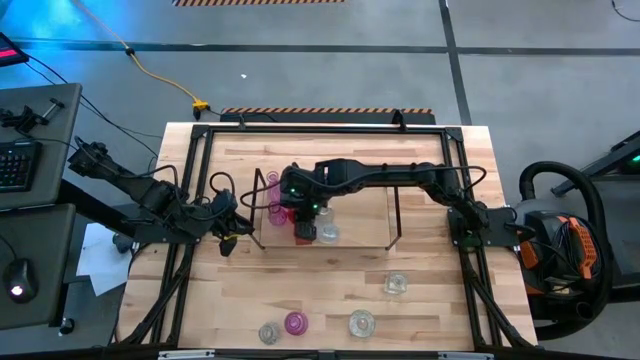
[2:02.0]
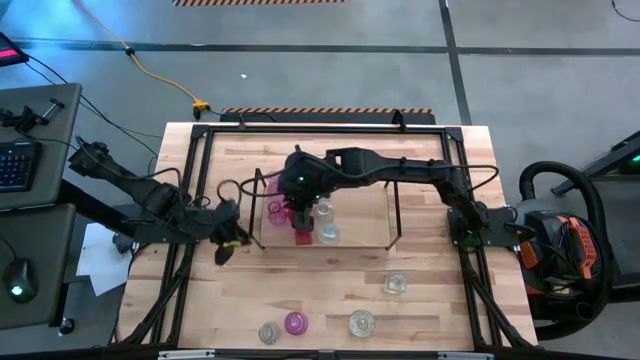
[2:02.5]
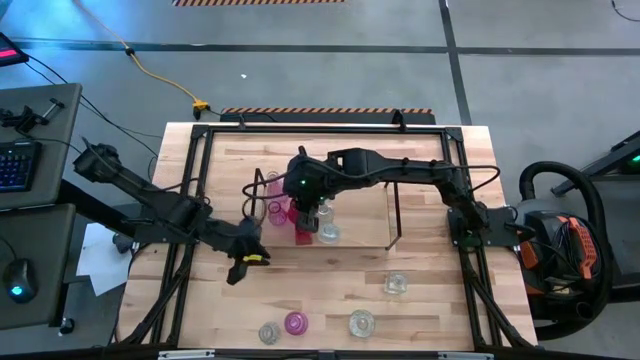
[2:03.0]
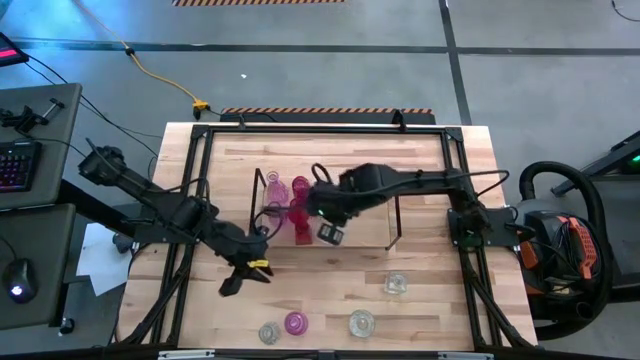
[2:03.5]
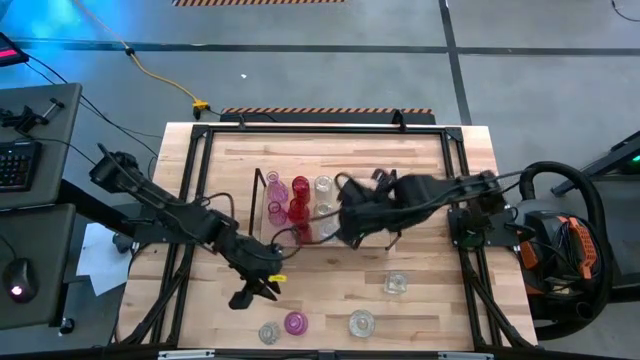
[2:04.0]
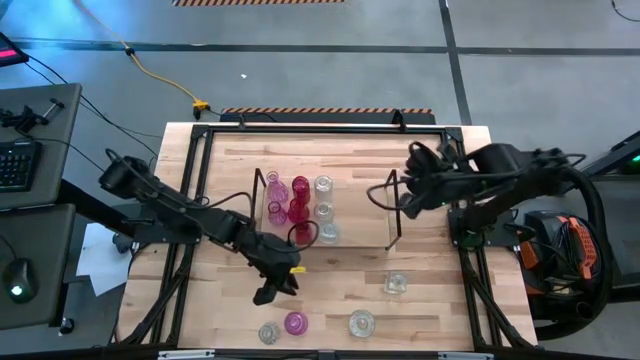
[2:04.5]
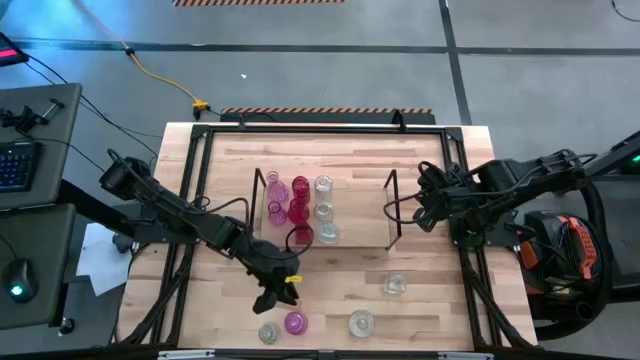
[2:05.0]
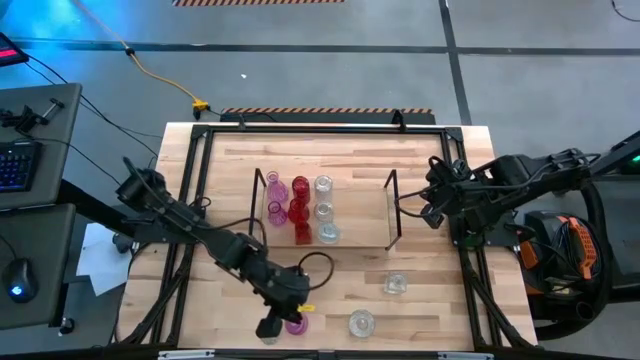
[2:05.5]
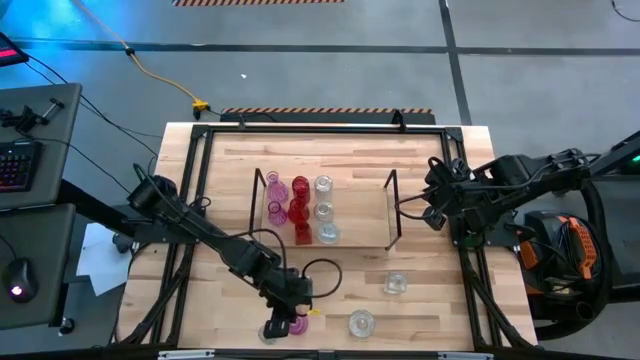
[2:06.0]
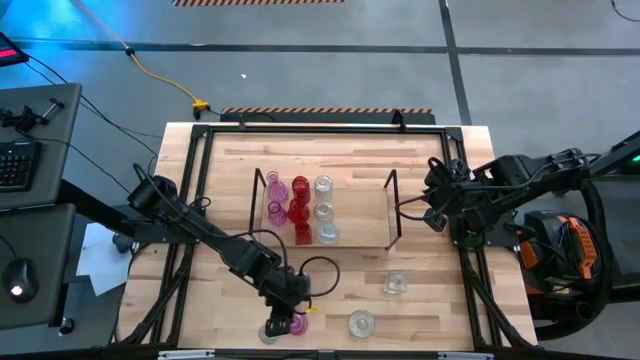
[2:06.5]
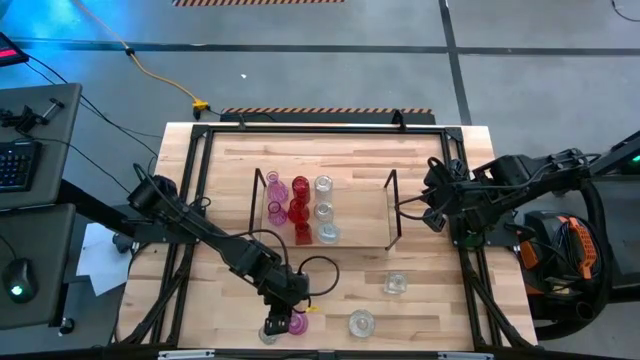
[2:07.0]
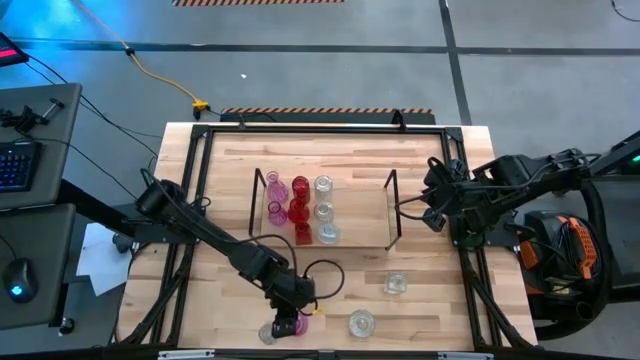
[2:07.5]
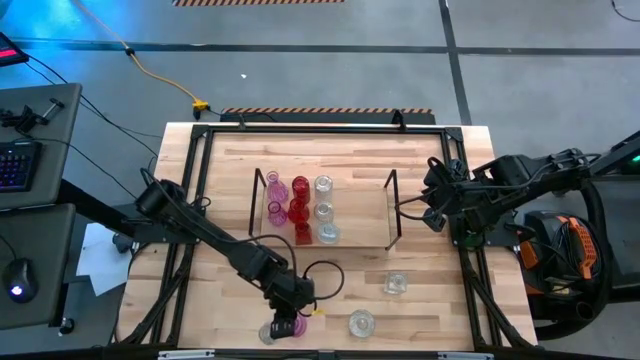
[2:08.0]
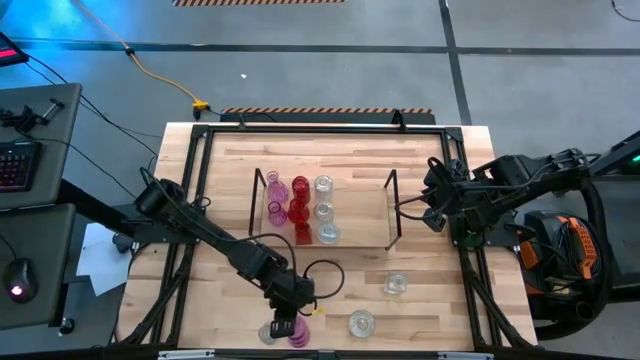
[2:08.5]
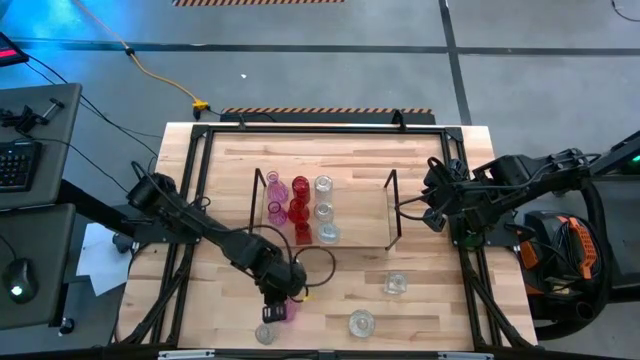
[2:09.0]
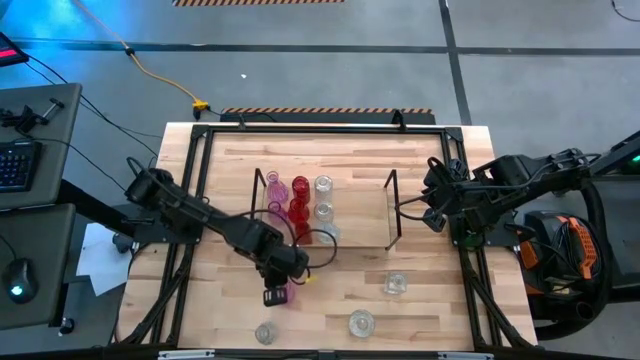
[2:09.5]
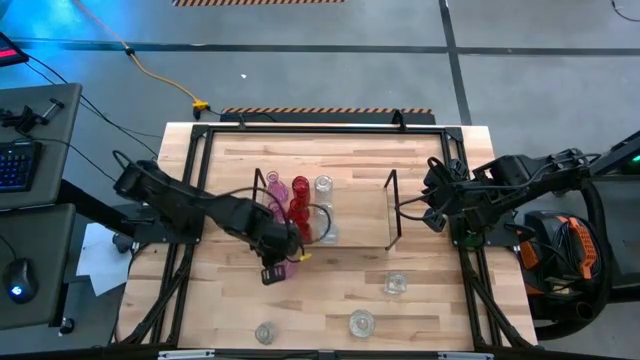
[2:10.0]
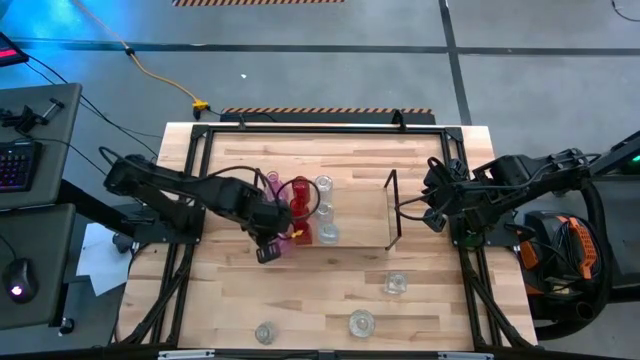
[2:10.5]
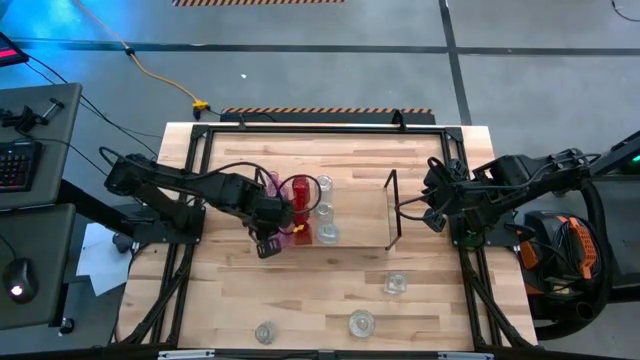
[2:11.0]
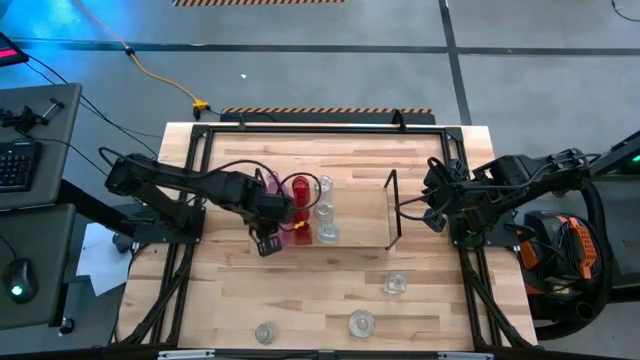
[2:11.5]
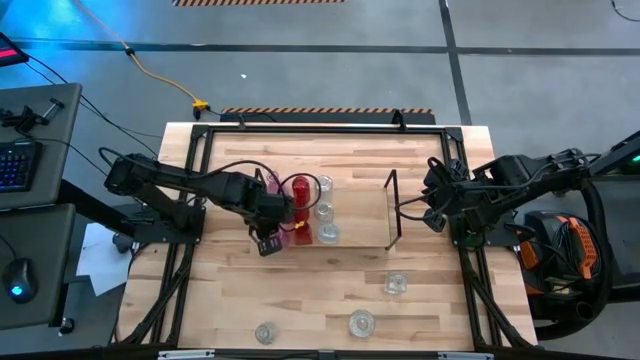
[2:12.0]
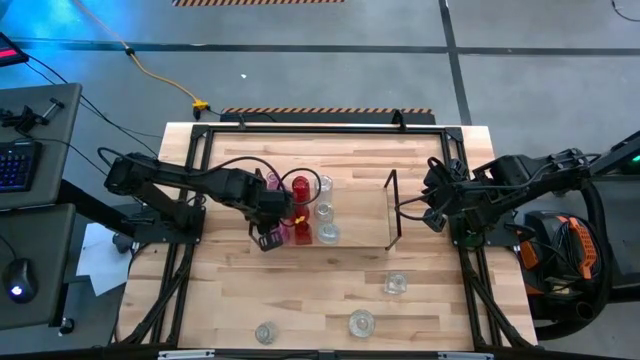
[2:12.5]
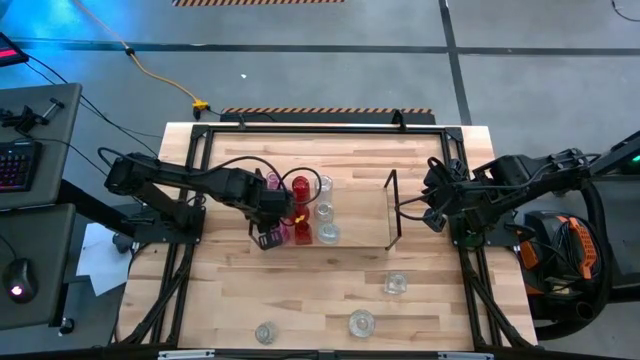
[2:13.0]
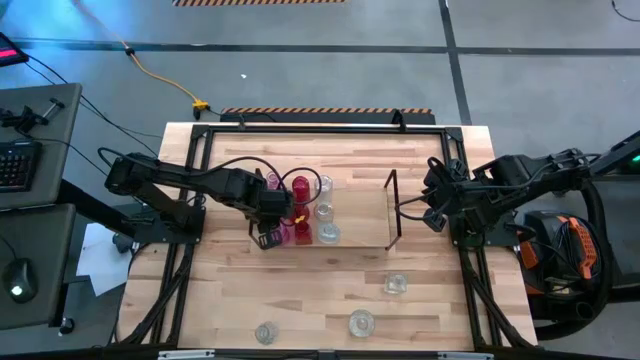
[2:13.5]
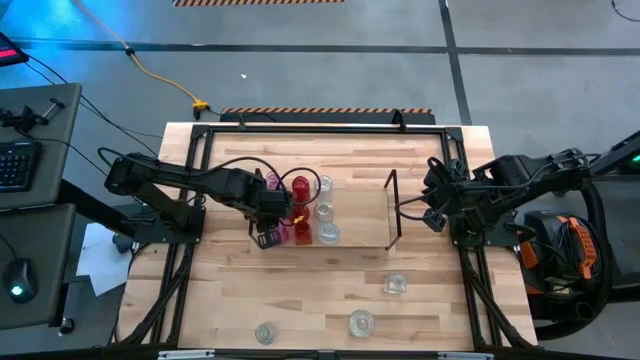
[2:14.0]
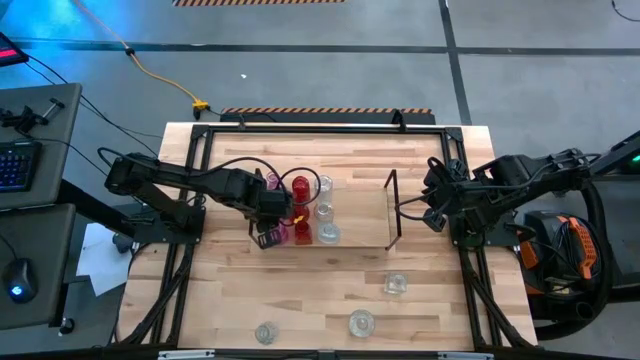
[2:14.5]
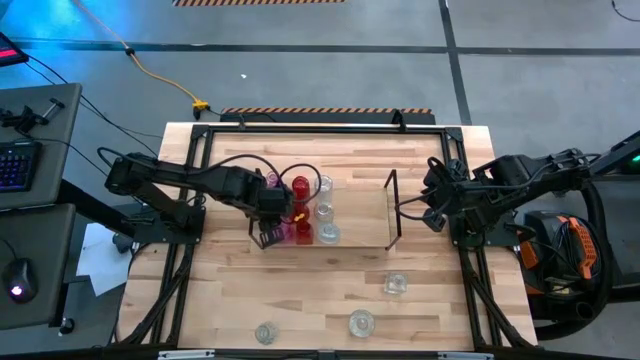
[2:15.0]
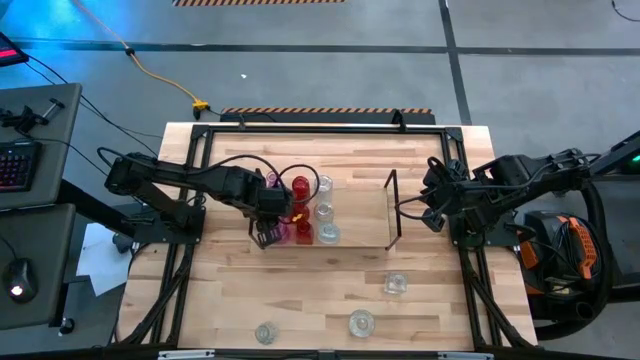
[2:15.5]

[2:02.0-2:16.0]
Task: sort vases onto shelf
Put the pink vase aligned with the other pink vases on the shelf

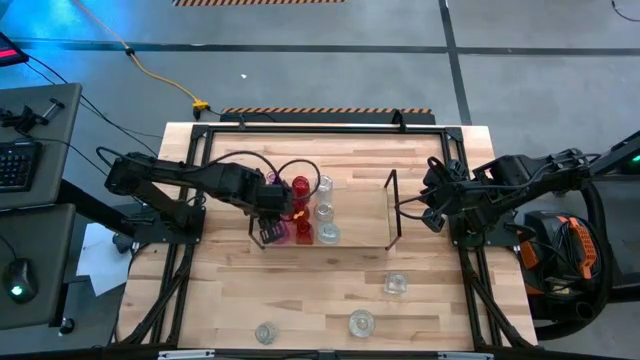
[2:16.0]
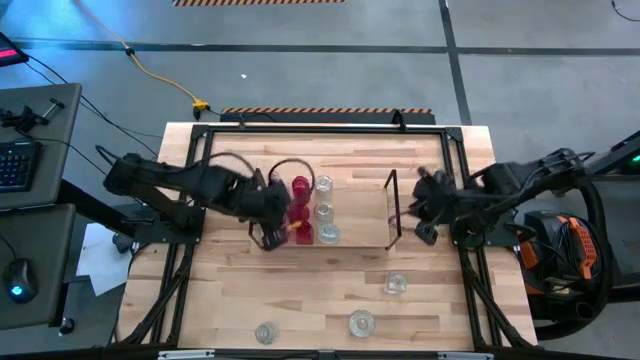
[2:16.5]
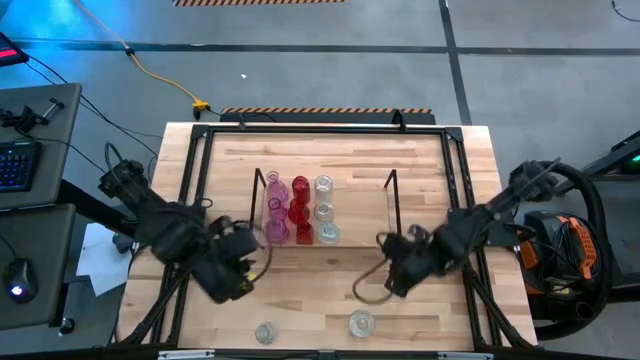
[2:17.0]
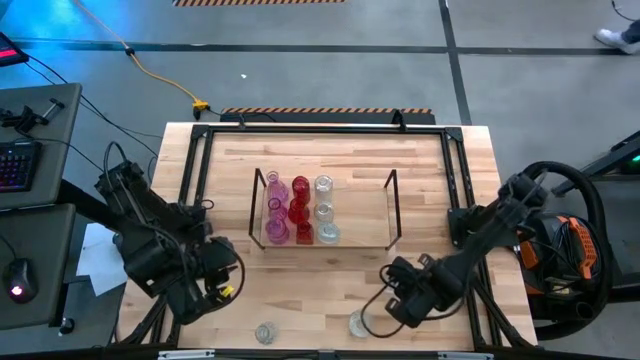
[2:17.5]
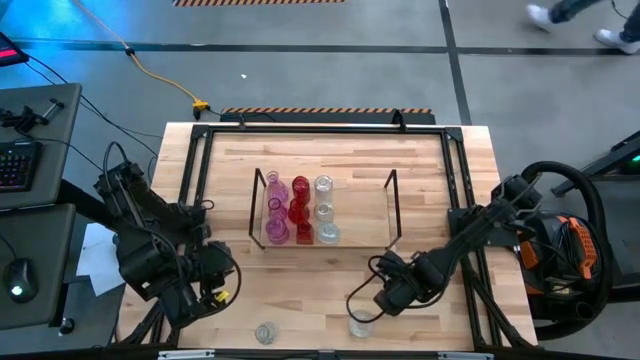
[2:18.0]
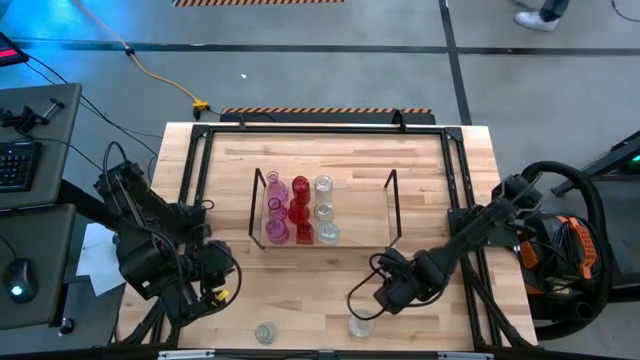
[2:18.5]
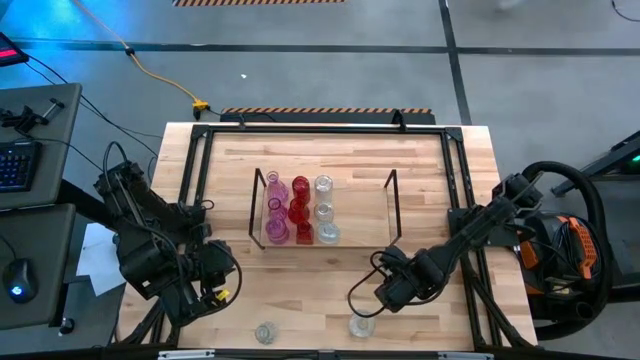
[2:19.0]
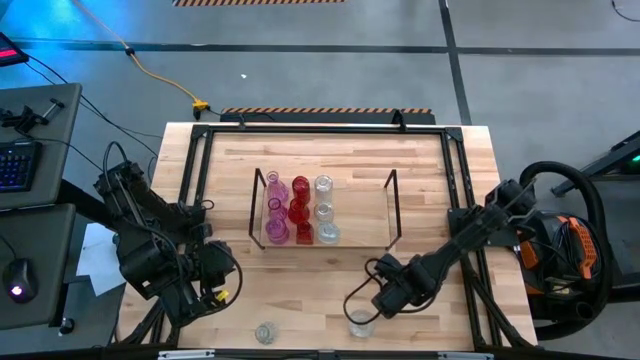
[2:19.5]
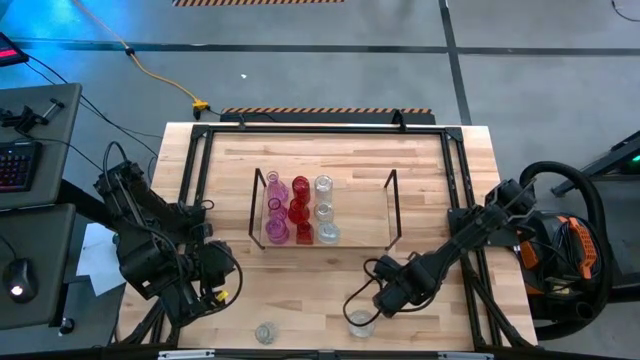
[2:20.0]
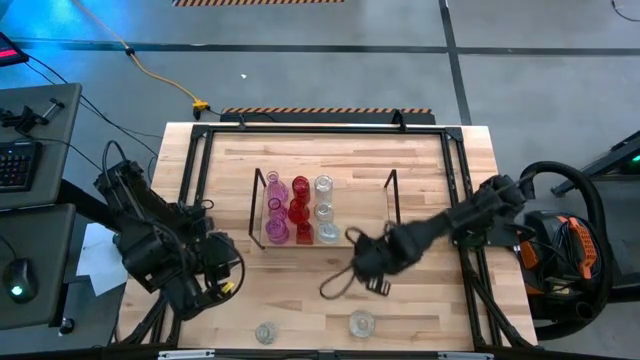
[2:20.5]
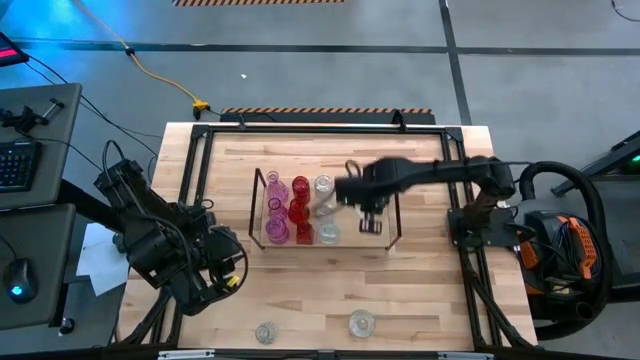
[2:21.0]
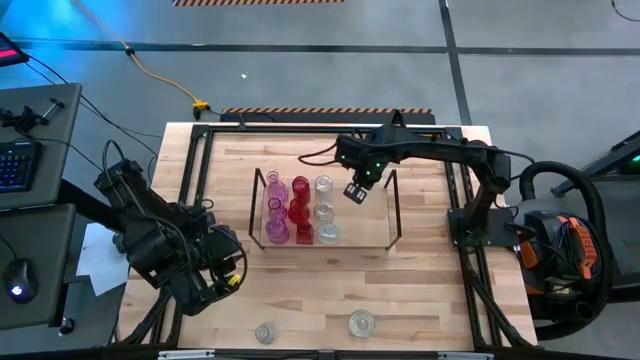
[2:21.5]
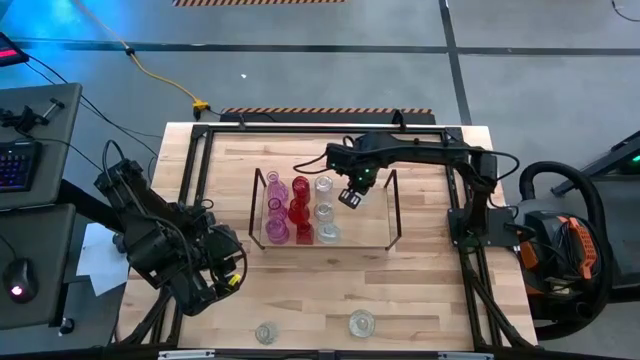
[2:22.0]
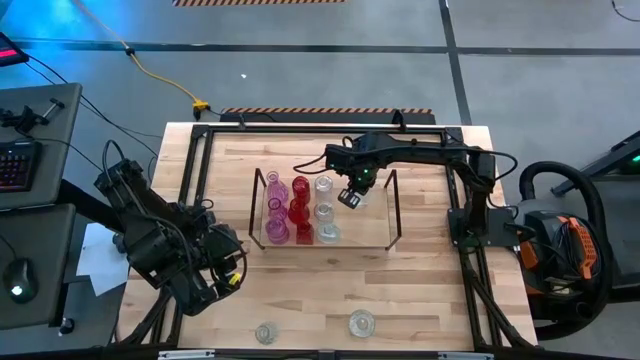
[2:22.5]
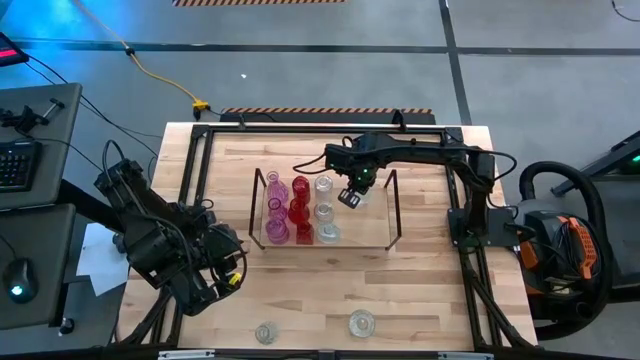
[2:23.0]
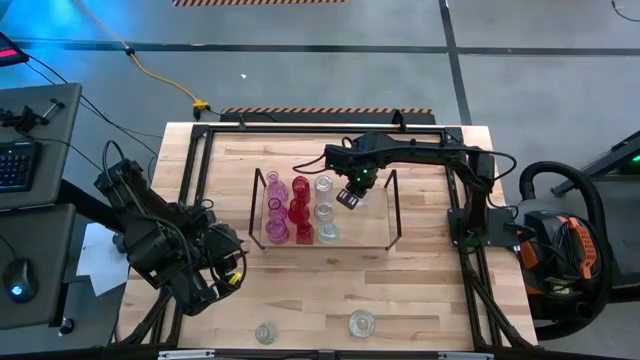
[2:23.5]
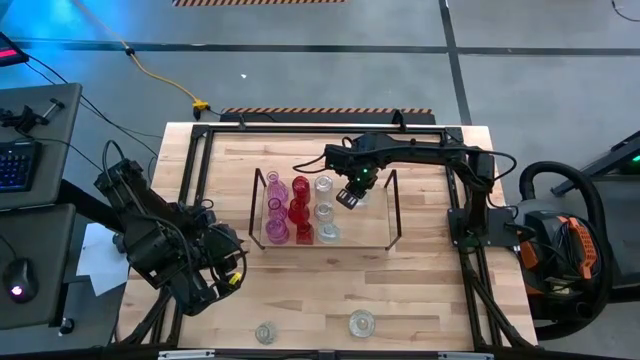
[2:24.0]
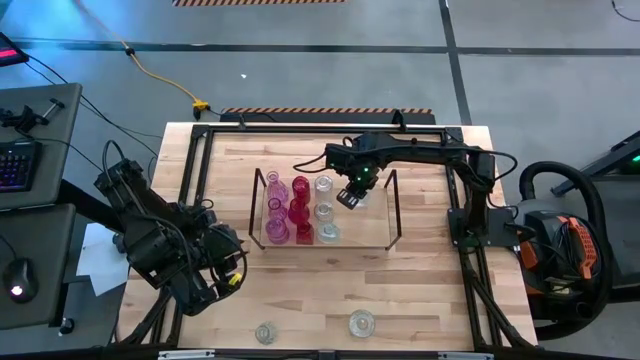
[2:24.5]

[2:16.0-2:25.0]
Put the transparent vase on the shelf
